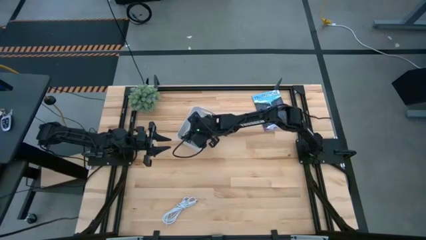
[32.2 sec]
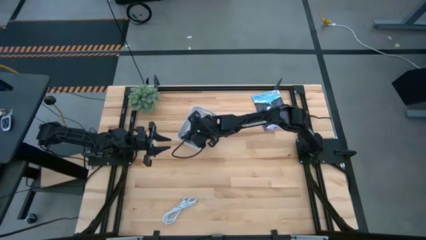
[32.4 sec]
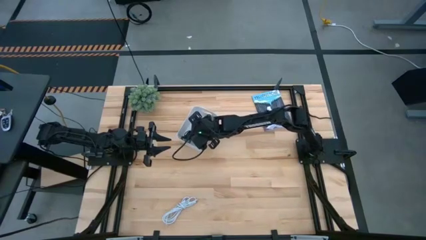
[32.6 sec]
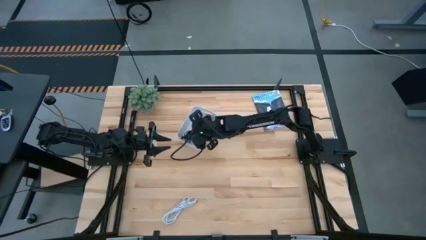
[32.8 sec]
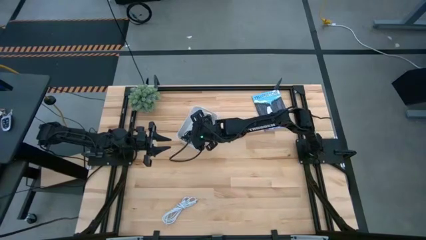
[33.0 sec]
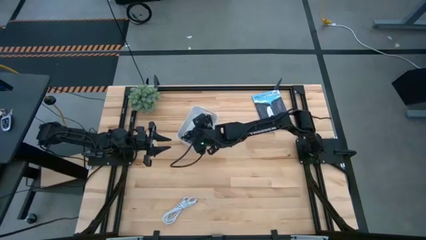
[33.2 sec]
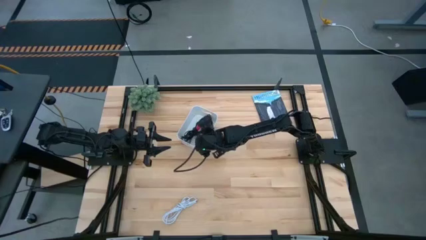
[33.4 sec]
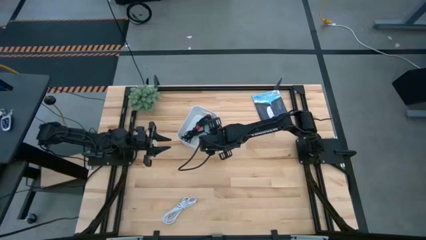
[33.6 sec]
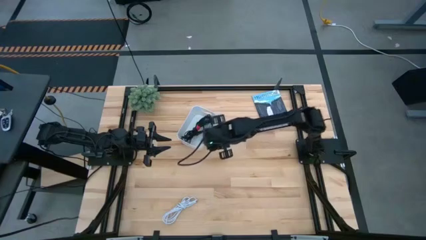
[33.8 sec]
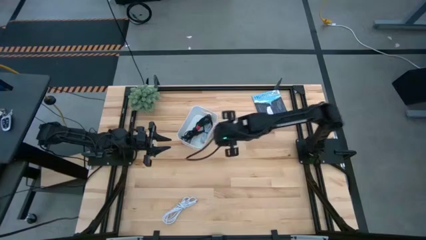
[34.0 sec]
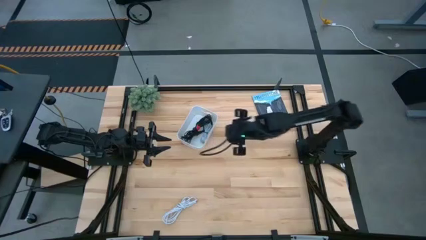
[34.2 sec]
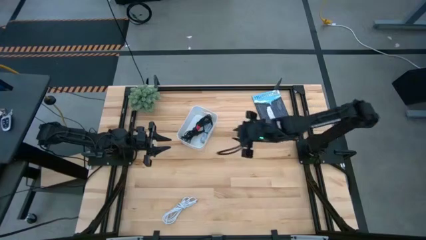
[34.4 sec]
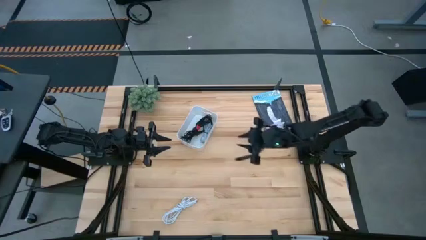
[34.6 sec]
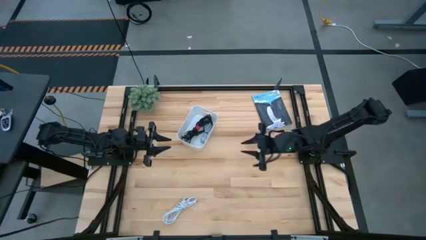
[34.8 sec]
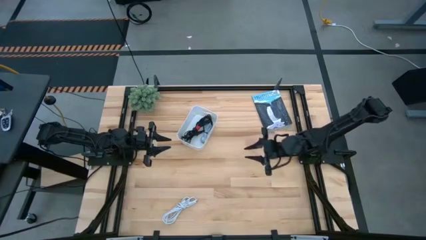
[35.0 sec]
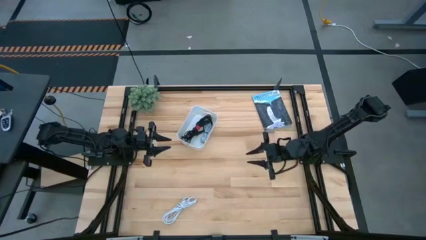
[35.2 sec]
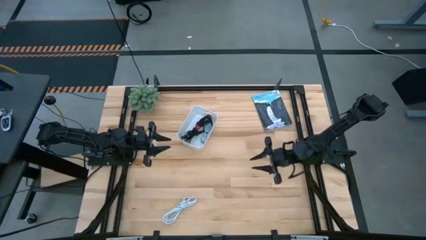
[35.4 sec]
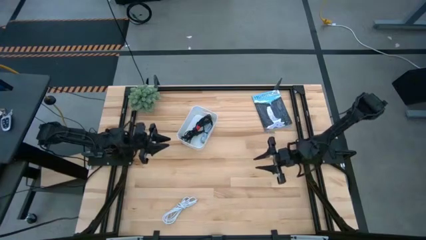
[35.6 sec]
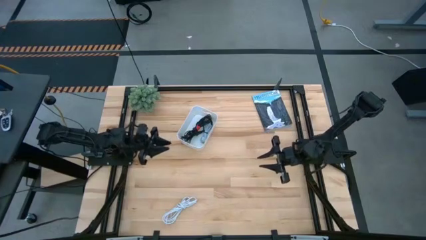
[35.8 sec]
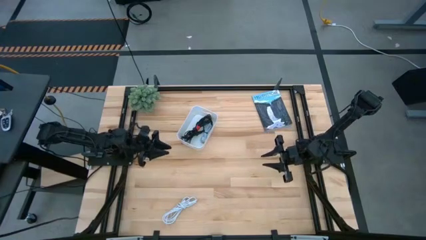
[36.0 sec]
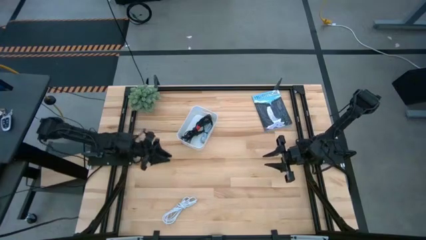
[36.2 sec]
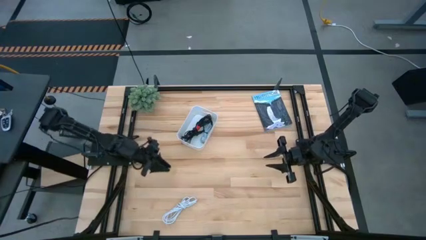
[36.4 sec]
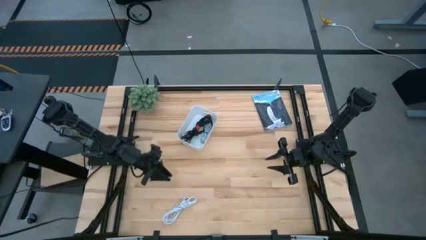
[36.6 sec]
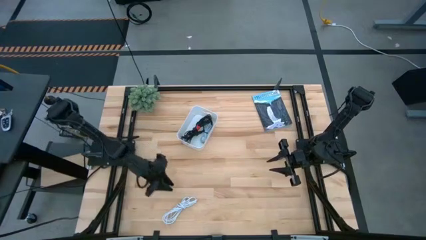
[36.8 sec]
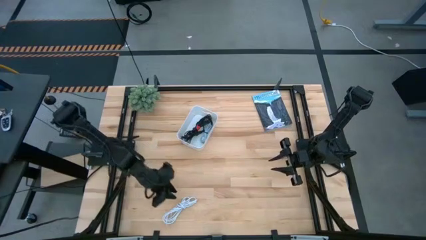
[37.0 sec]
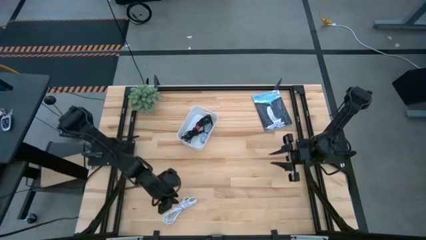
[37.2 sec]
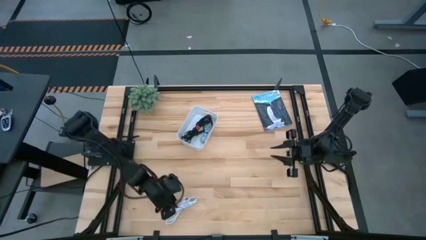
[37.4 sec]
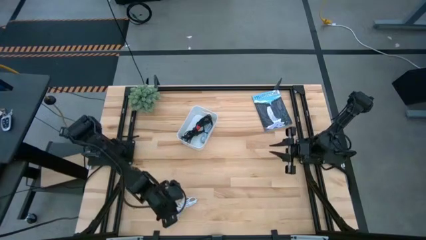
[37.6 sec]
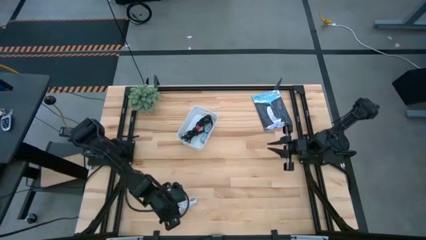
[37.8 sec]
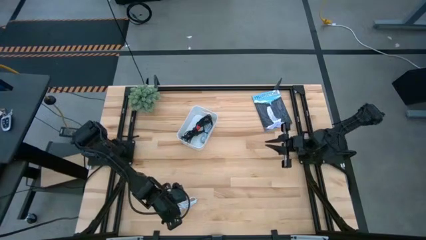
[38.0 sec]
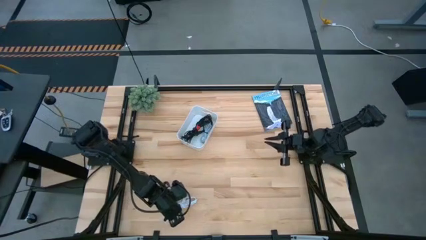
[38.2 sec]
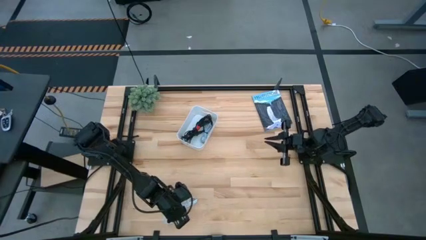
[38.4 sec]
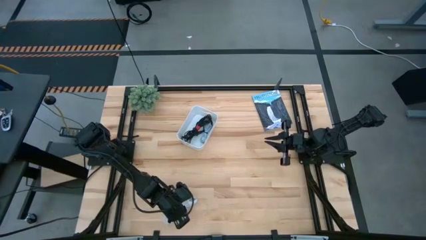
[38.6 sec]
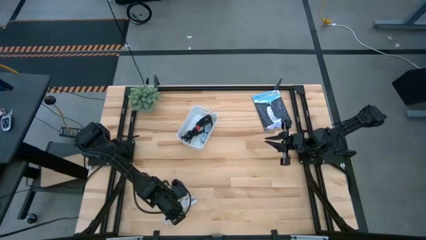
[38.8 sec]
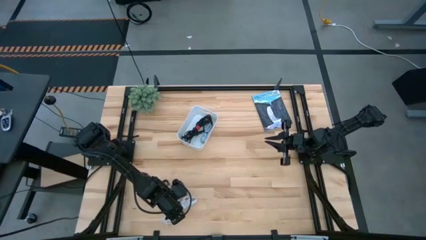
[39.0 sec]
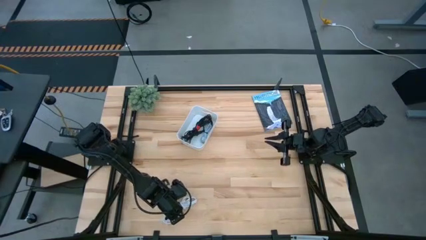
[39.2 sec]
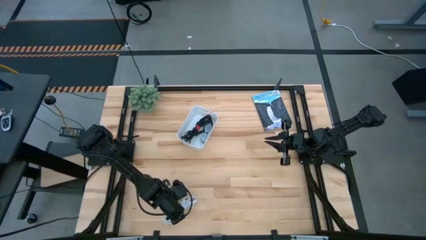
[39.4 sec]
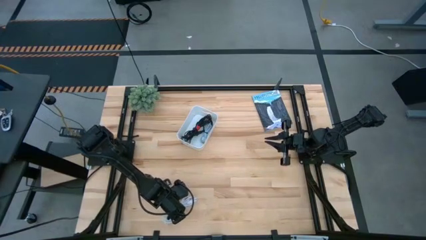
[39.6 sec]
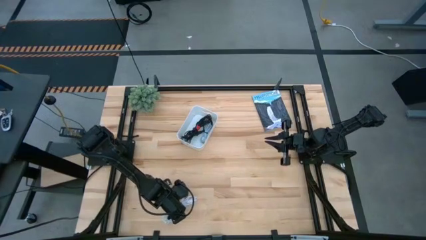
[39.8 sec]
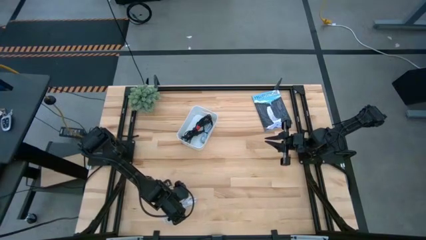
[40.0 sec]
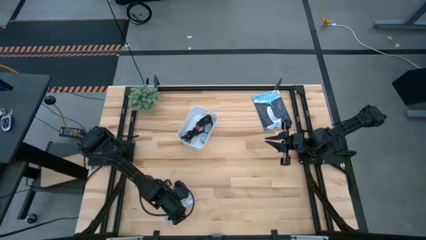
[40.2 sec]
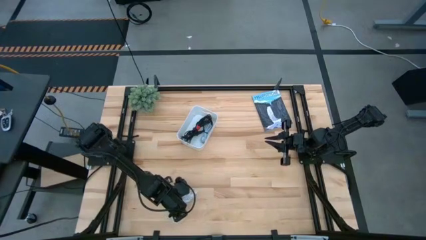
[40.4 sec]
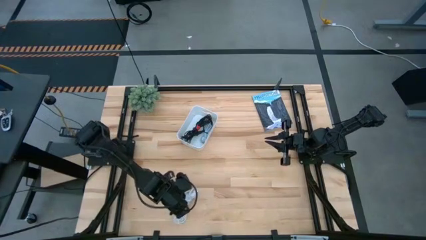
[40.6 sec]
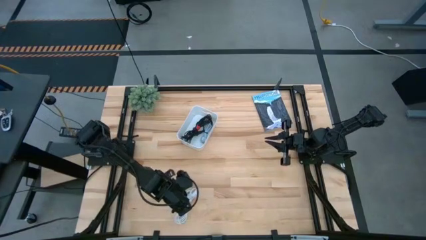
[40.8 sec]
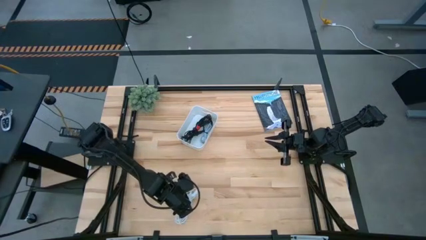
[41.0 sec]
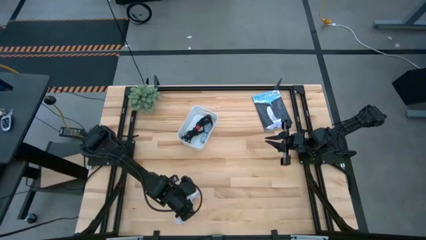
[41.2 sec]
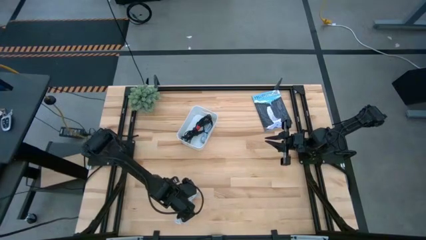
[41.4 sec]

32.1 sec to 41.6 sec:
Task: Pick and place USB-C Cables
Put the white charger cable into the white bin

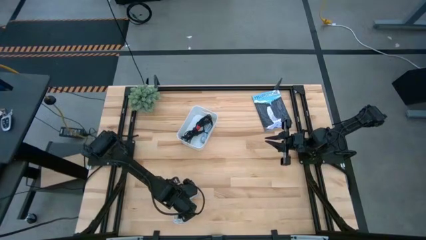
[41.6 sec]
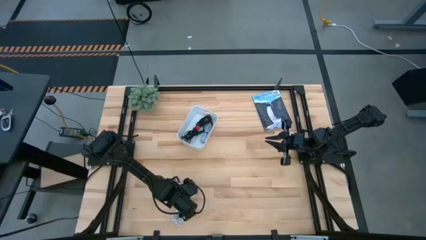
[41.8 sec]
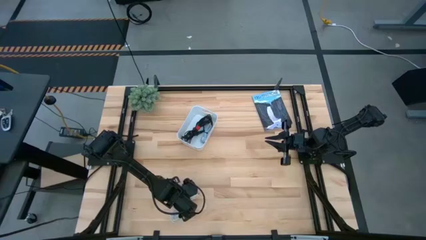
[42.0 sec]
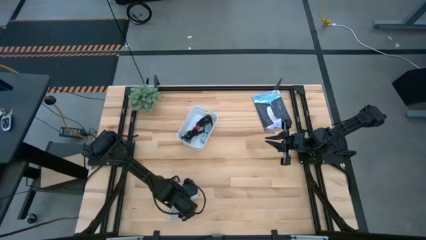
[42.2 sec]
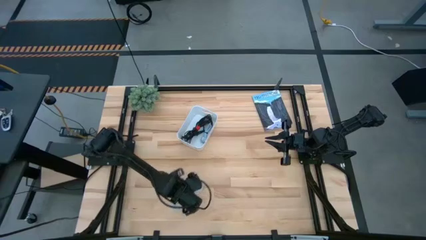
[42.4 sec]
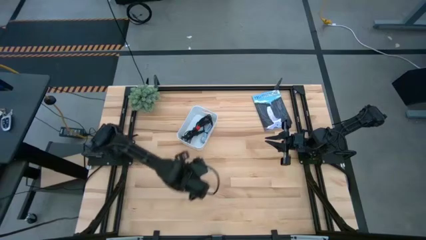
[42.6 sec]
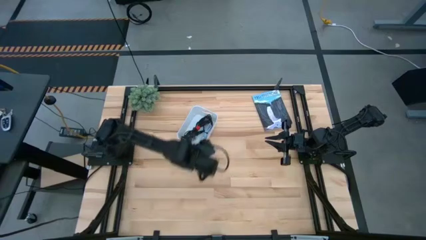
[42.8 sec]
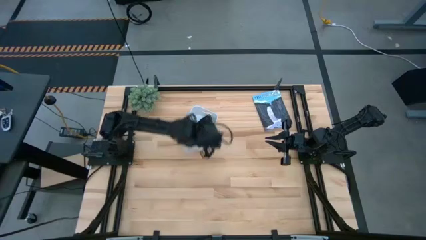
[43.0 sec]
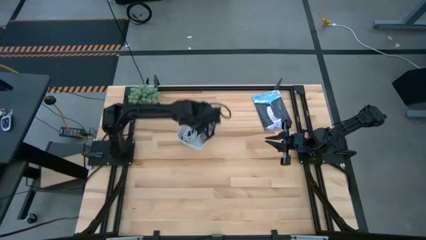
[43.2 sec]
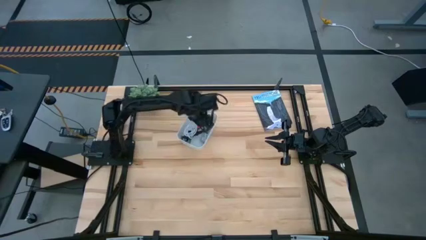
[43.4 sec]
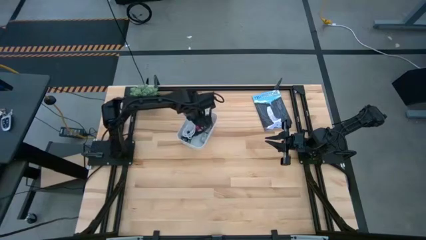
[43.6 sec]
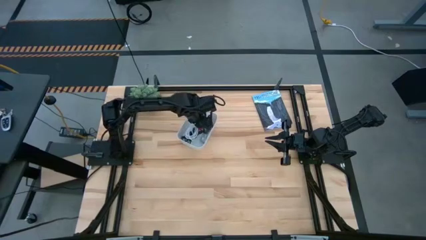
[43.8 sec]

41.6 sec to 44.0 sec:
Put the white charger cable into the white bin

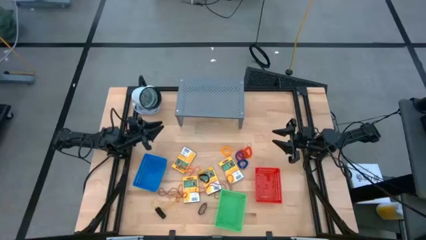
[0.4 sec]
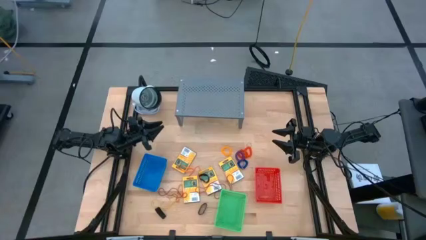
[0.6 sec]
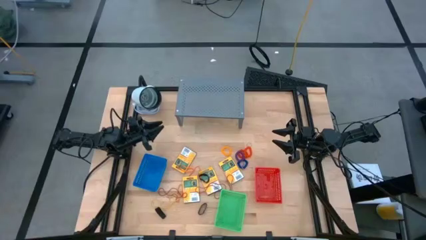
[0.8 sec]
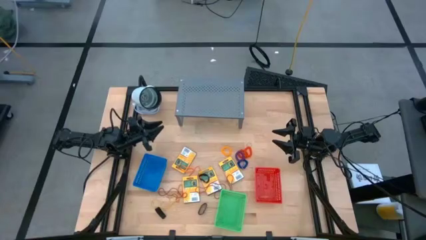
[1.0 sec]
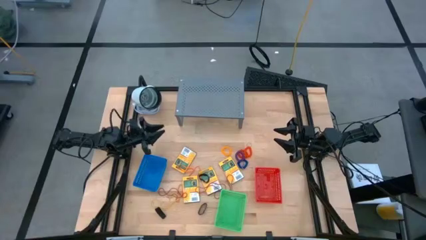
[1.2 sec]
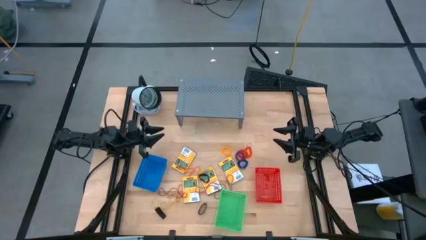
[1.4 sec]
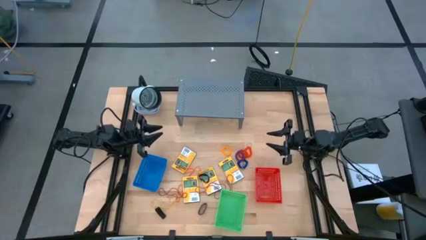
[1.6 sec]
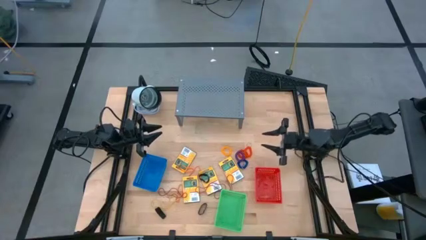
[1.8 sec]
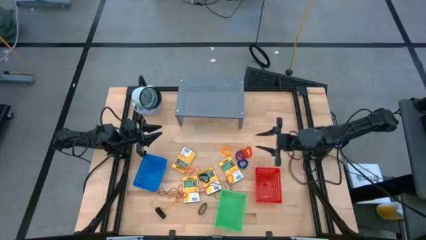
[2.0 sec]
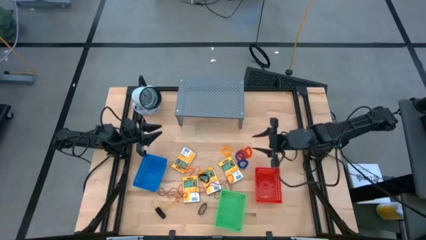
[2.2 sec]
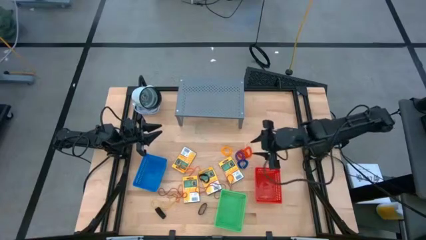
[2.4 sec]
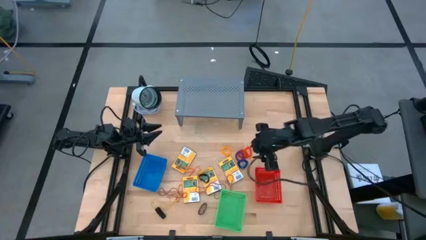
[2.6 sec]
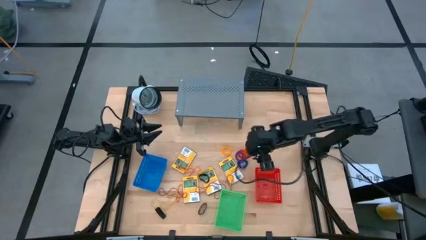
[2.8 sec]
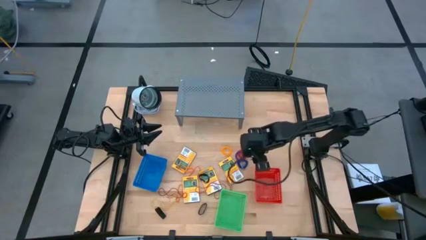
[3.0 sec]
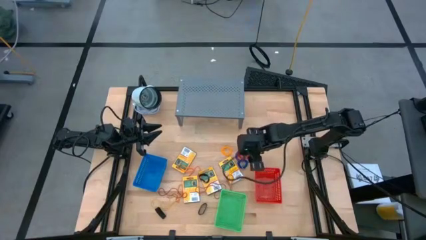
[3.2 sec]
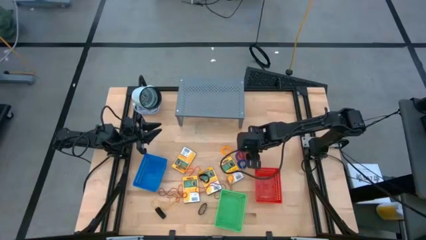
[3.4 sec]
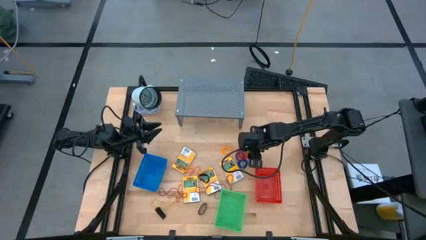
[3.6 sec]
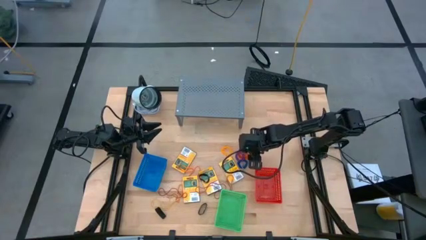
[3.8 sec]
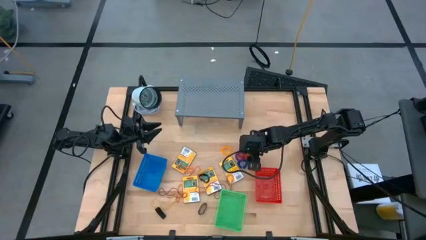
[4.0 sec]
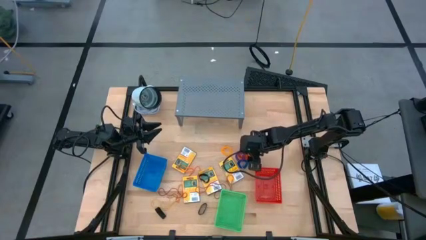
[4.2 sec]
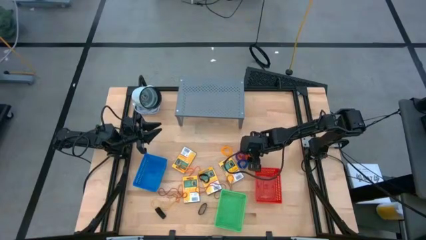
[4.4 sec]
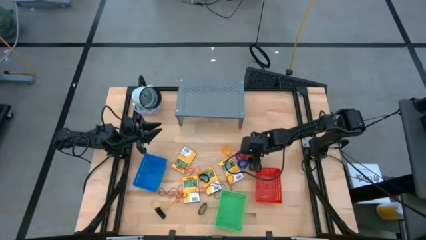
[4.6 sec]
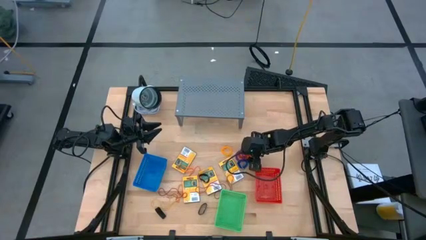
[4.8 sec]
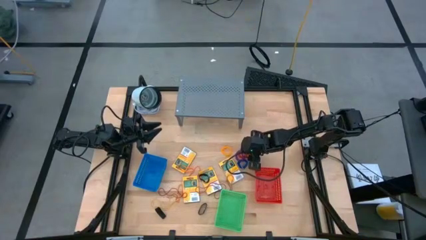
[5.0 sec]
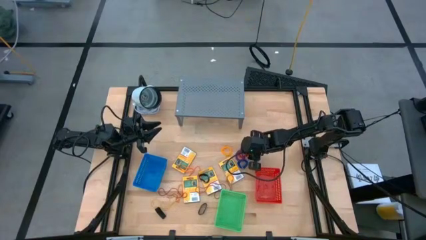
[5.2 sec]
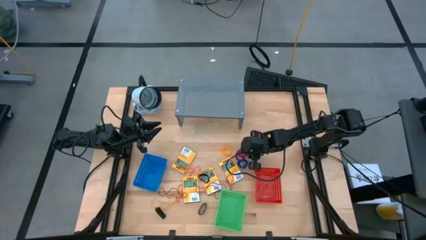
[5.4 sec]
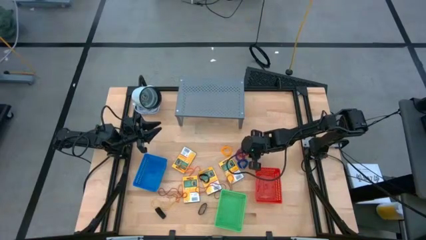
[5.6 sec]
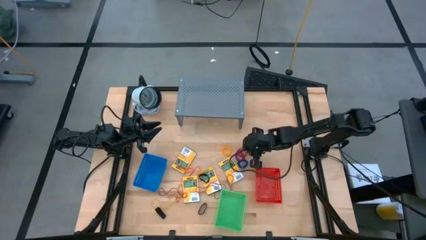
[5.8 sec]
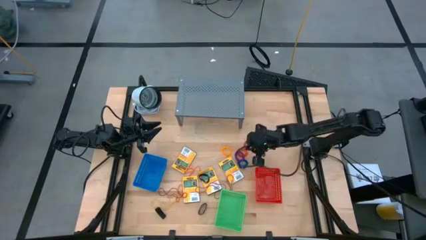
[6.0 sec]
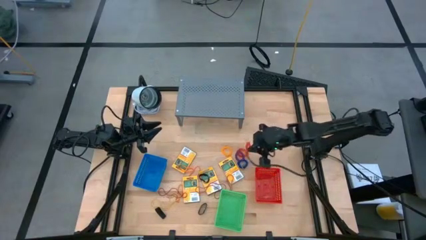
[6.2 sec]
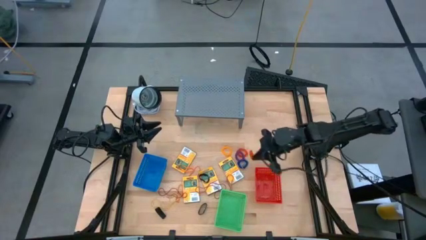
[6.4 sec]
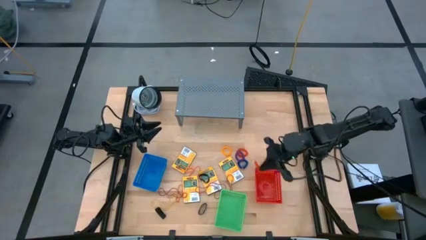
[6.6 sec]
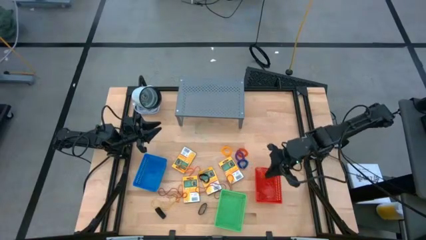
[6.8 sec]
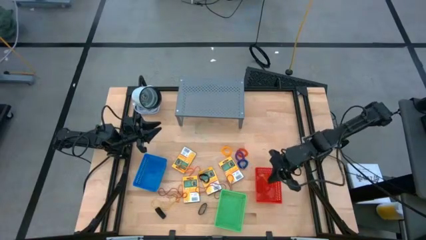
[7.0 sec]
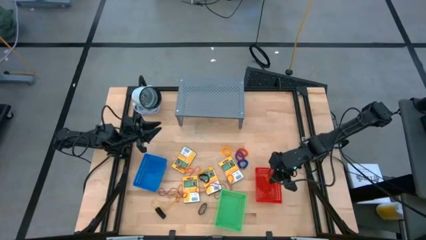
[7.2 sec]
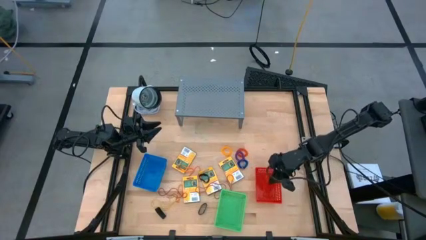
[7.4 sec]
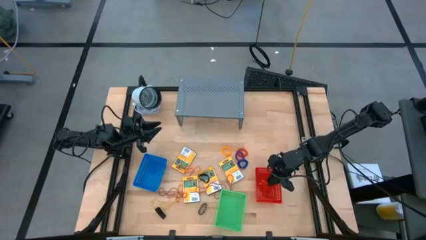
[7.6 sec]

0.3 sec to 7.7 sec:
Task: Pick & Place Office Desk Supplies
Put the orange spring keychain into the red bin
